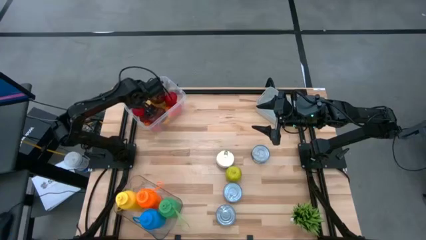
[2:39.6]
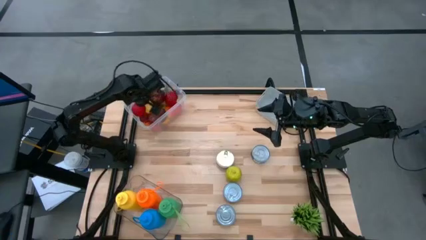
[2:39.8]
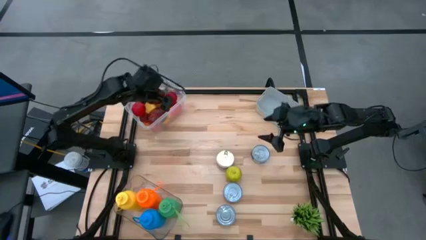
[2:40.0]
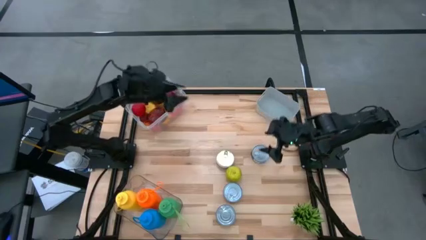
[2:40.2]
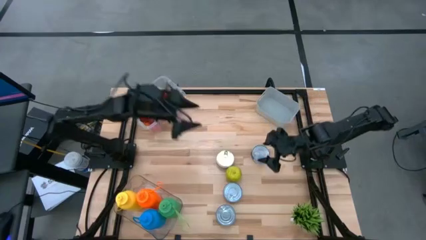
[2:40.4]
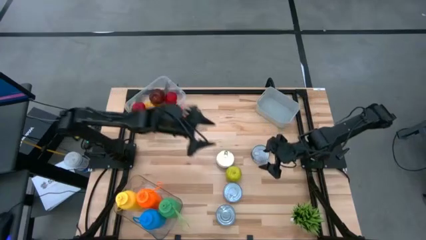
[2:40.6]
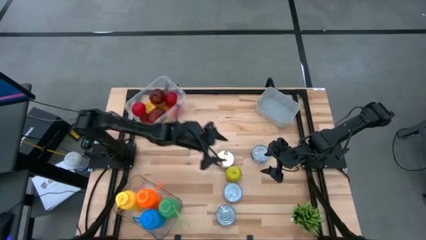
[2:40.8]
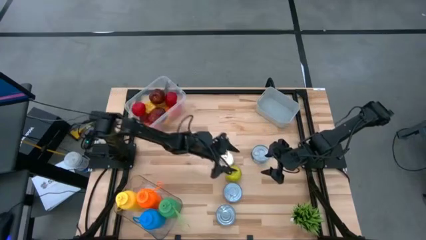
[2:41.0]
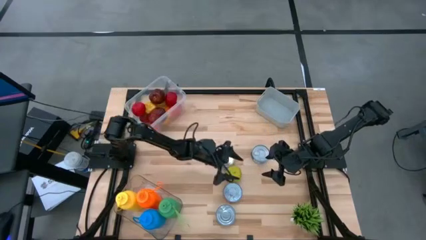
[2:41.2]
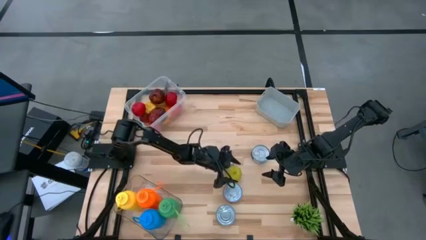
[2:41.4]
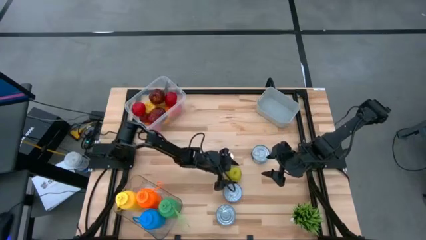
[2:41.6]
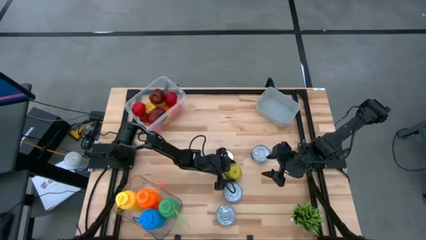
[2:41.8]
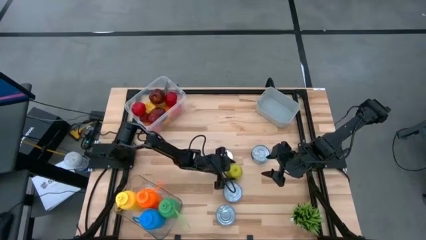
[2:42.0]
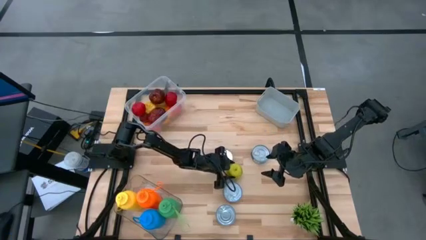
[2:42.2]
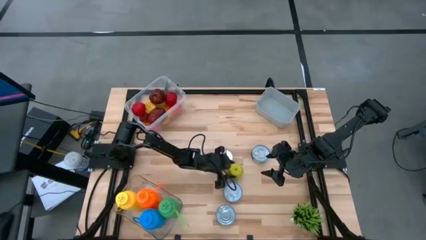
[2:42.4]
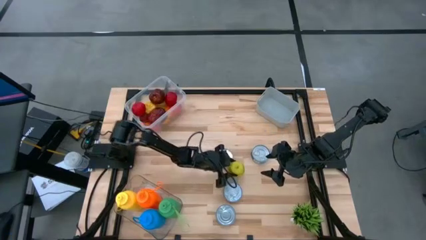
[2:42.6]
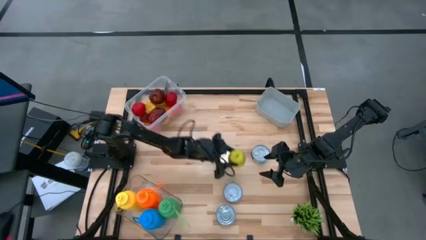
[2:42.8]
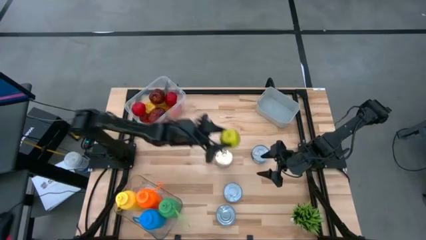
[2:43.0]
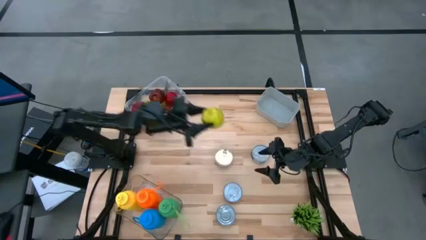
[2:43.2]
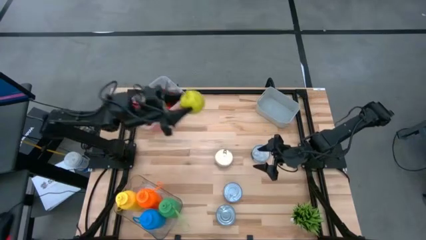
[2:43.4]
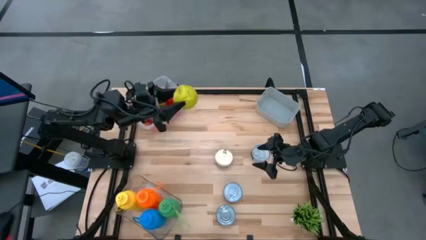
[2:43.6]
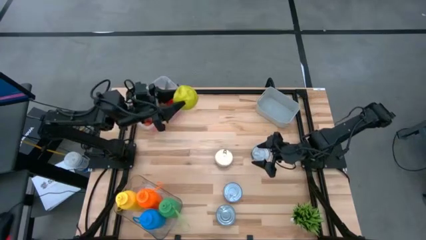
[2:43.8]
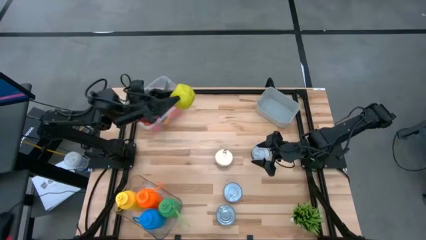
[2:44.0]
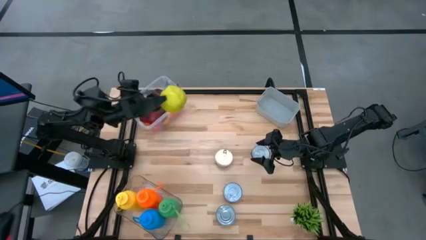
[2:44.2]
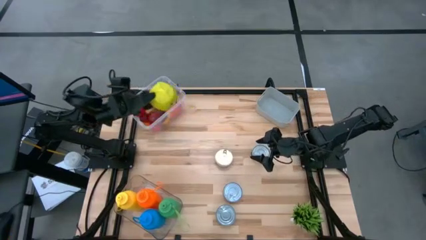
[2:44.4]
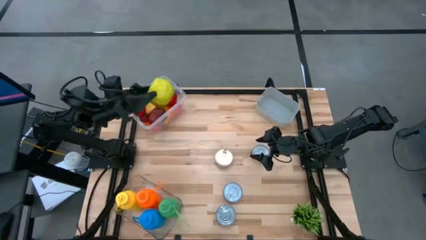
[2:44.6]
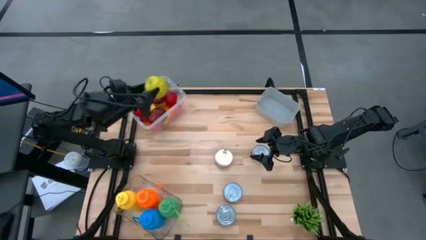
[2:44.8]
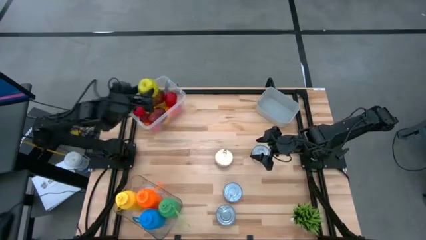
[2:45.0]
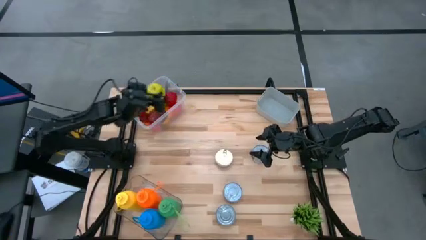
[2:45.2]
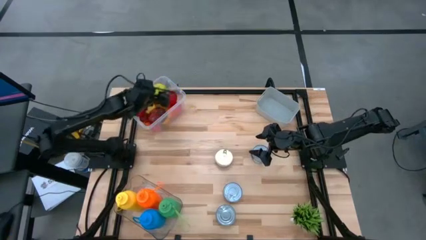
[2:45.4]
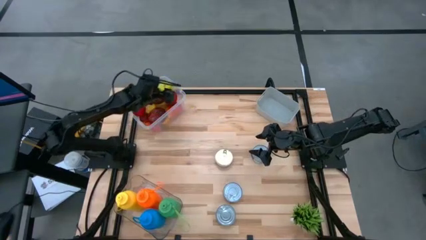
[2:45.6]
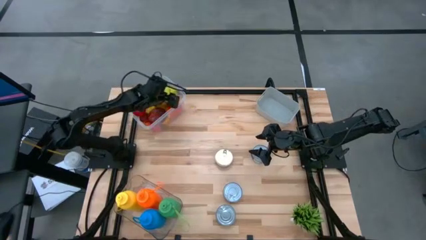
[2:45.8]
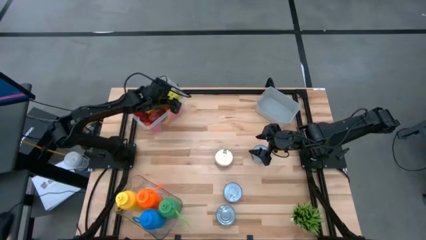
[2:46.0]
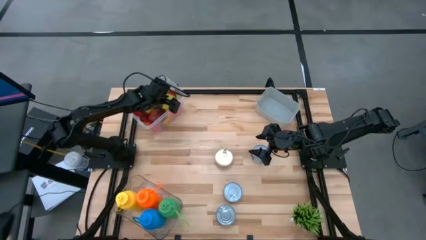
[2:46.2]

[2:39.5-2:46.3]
Task: Pick & Place Food Item
Put the green apple into the white bin

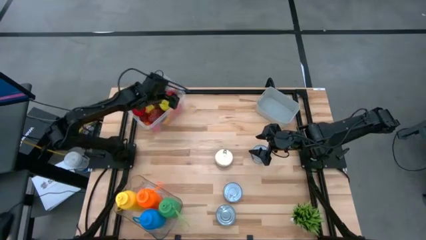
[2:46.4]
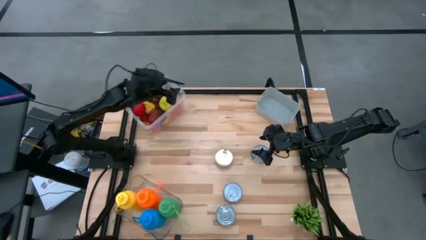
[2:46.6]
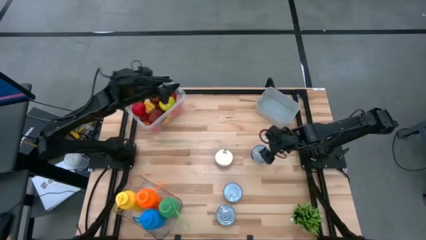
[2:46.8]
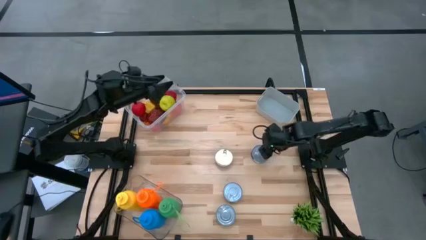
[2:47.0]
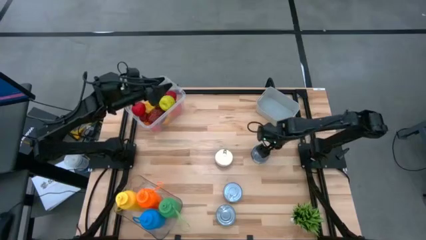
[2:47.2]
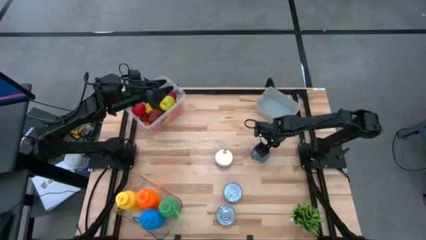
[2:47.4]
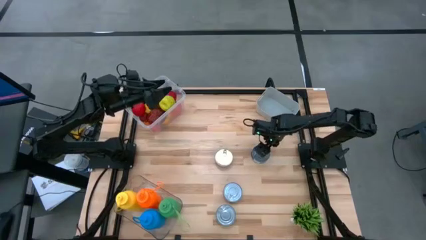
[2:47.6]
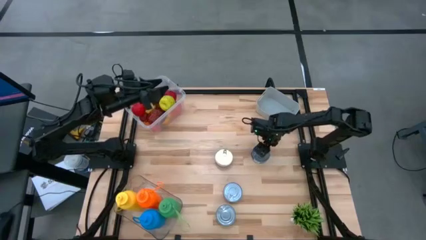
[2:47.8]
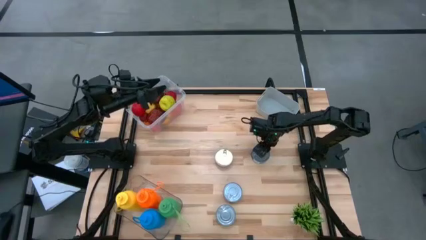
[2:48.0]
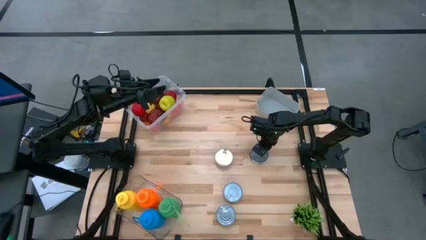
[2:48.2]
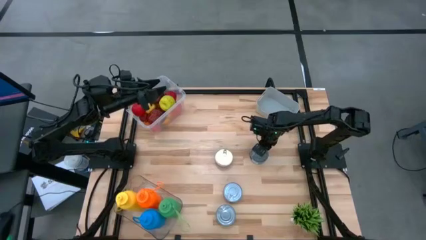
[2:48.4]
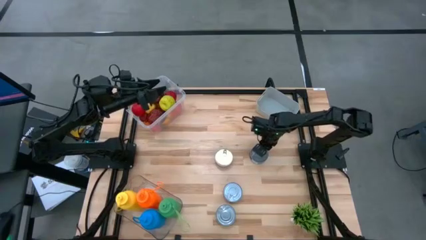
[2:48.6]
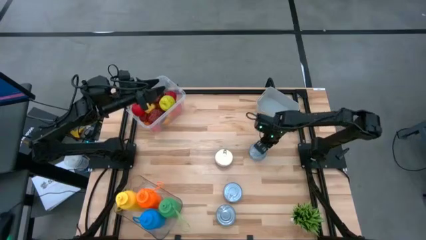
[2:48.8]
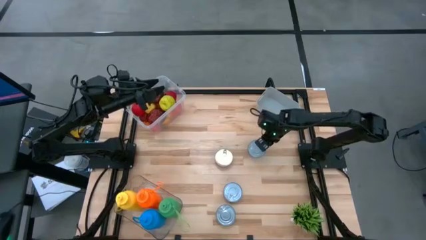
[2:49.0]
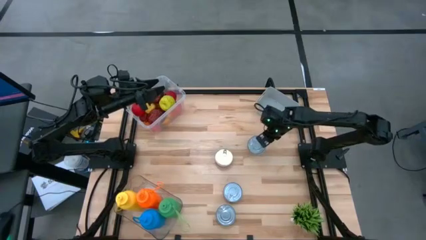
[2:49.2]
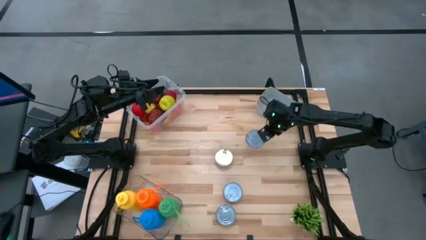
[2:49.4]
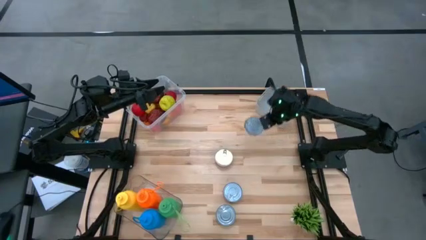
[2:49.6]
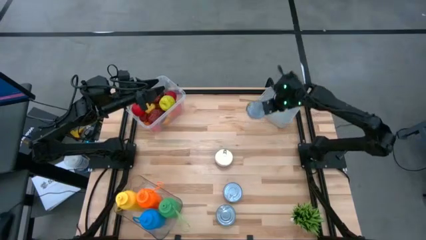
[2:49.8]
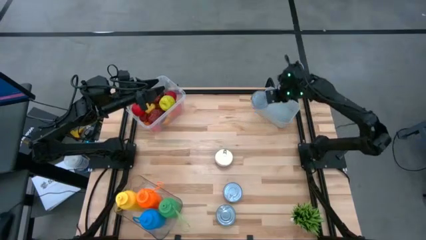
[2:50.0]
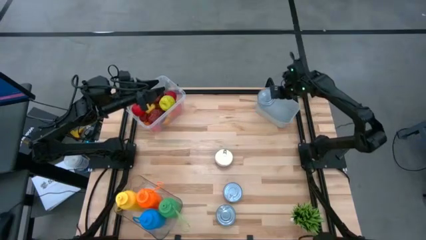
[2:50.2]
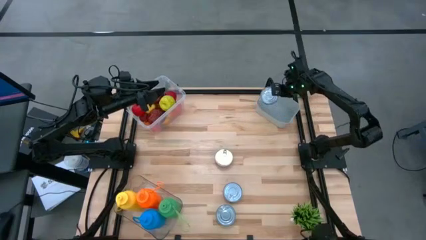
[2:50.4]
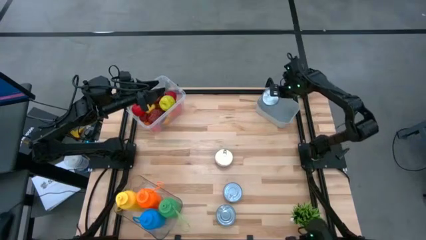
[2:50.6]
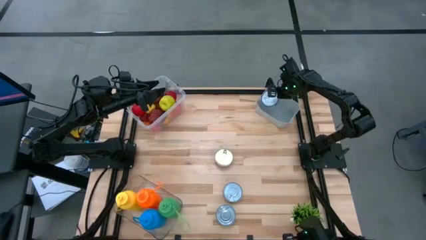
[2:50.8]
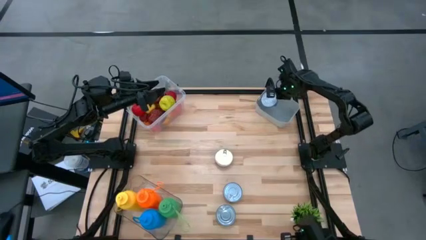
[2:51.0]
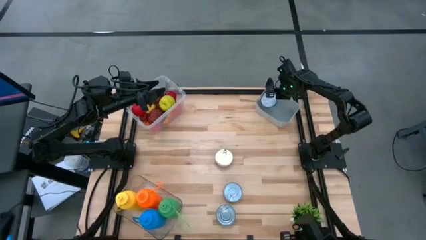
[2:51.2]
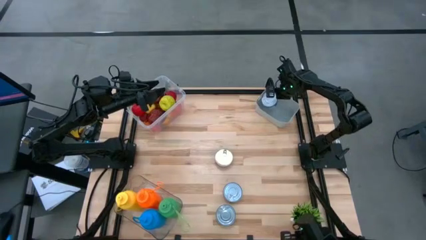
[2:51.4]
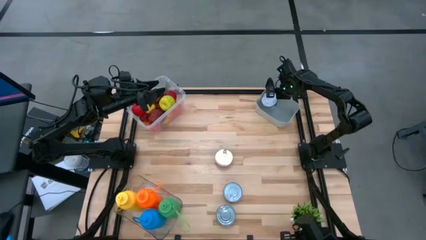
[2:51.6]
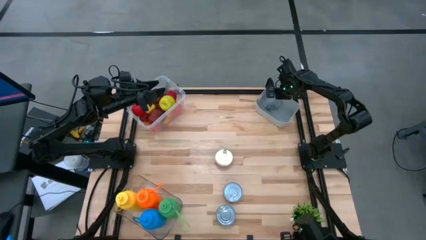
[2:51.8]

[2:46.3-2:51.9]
Put the blue tuna can into the gray bin

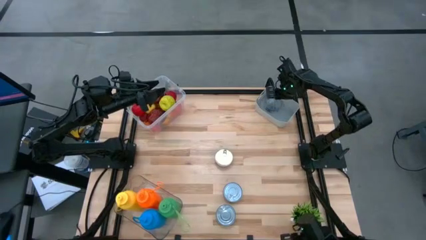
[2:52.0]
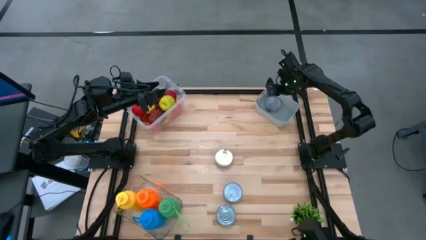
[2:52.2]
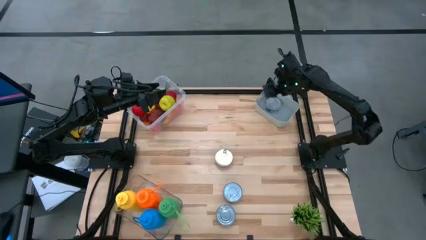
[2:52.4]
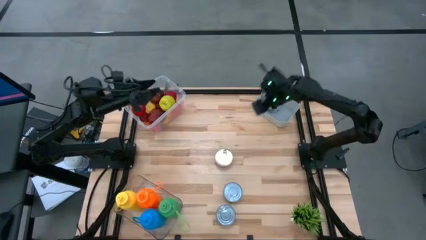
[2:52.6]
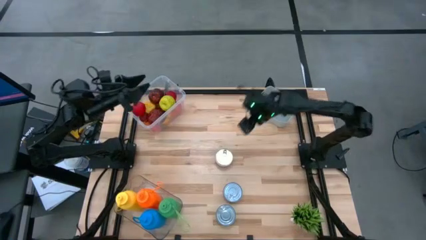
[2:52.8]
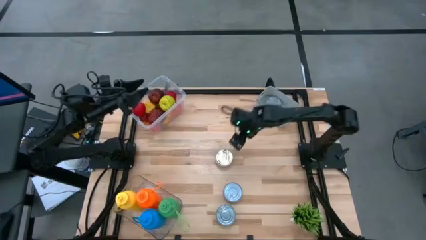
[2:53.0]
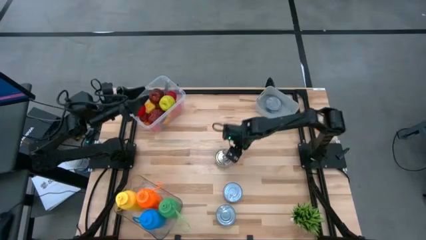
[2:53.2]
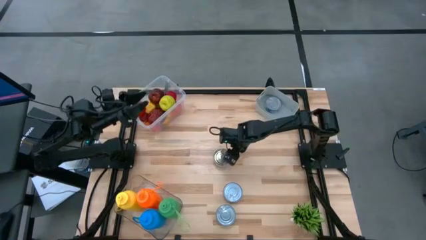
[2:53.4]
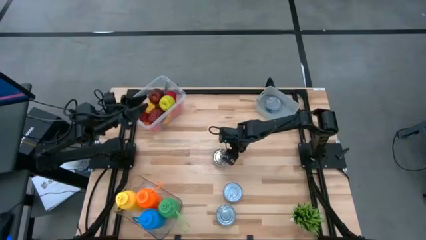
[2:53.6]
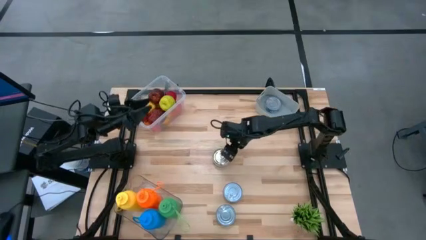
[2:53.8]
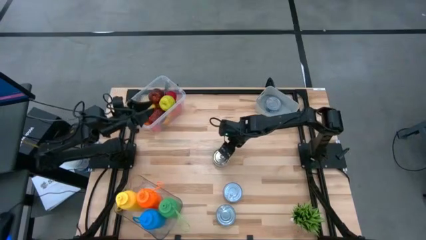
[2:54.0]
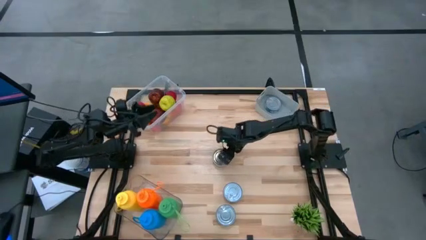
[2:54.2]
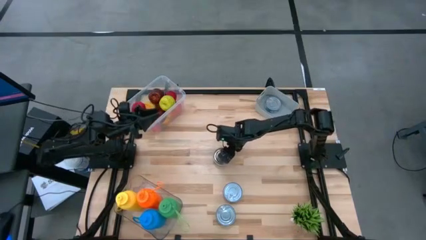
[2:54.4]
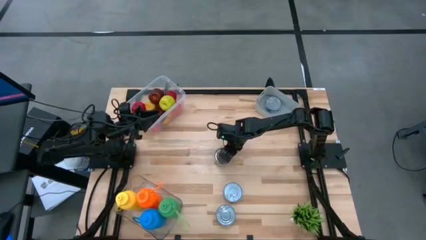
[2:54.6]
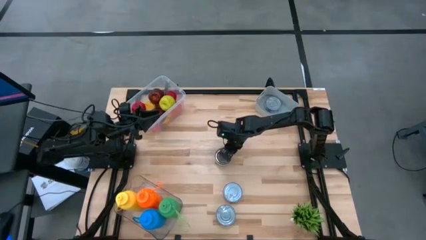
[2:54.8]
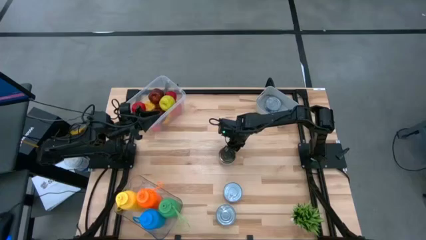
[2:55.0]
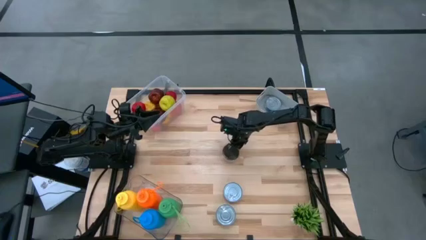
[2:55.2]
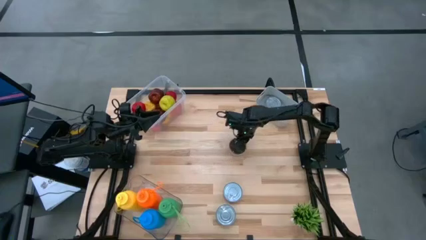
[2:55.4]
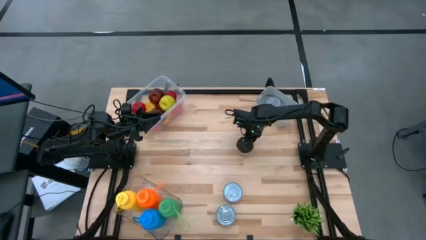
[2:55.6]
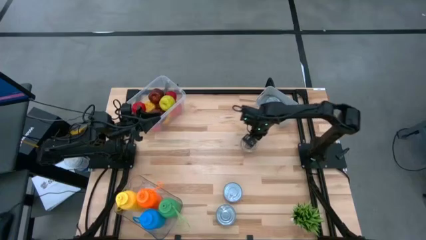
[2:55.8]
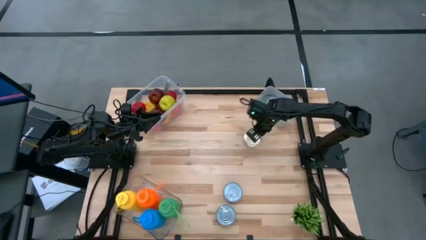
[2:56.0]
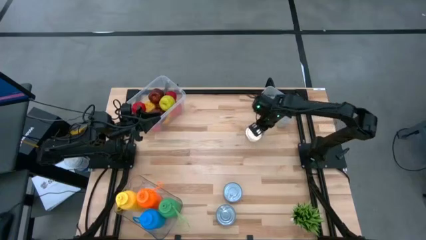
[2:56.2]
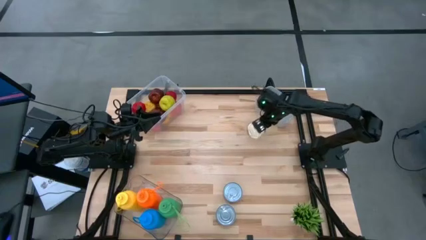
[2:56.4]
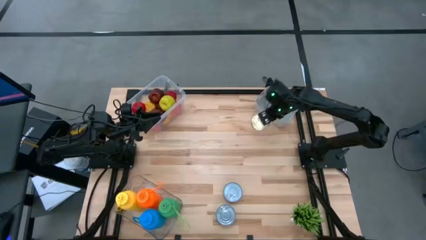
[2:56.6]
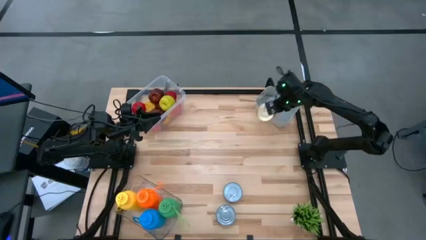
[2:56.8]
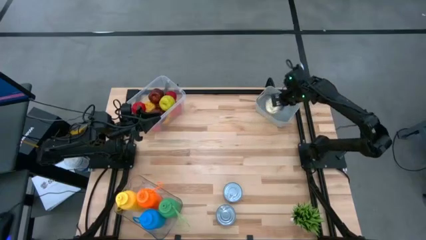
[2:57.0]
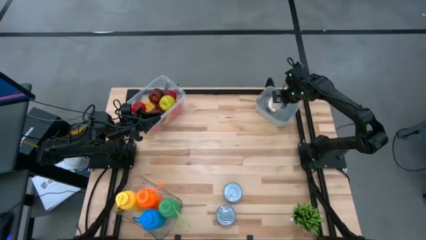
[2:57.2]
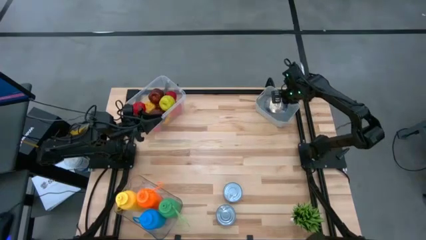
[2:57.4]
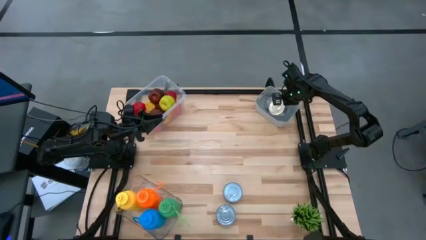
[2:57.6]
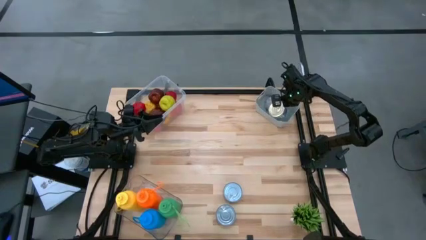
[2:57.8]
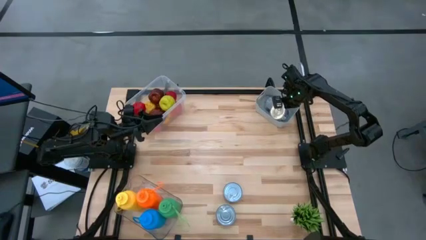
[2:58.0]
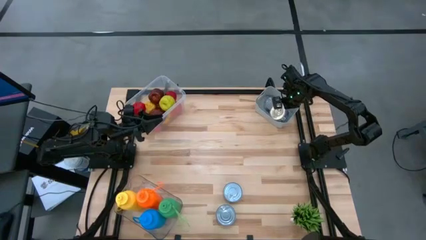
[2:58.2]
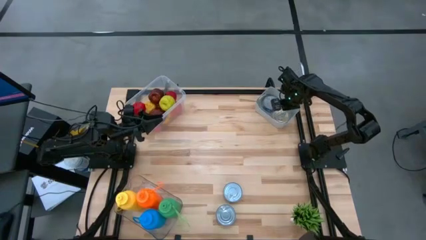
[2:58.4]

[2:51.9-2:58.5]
Put the blue and pink tuna can into the gray bin
